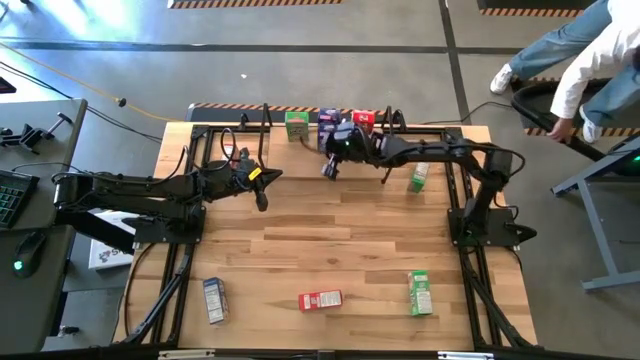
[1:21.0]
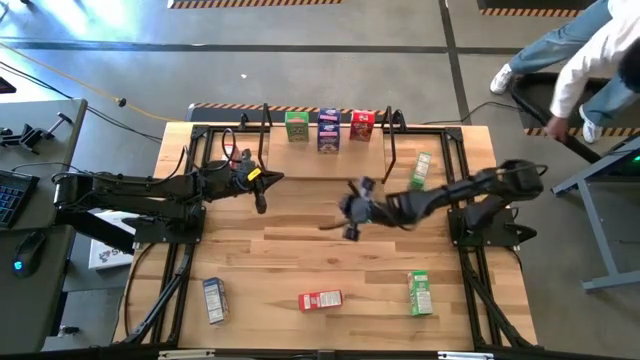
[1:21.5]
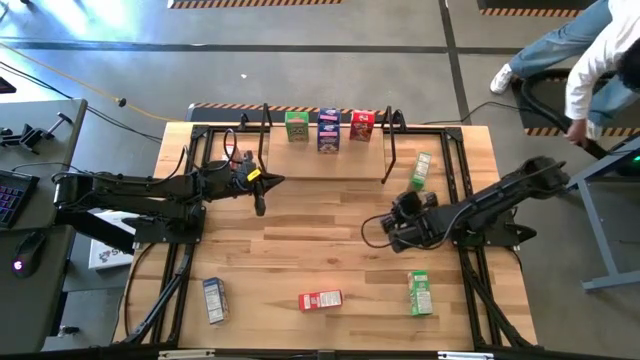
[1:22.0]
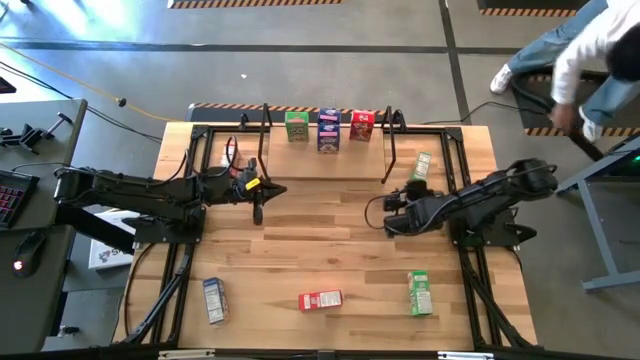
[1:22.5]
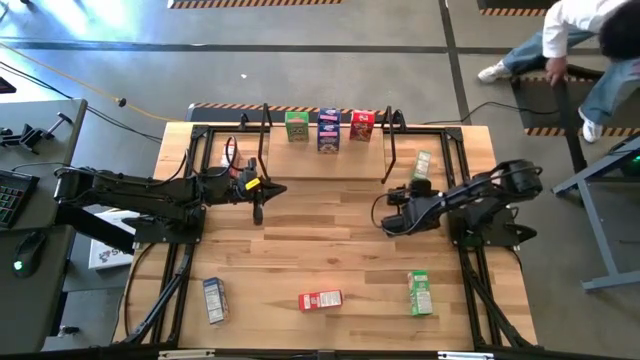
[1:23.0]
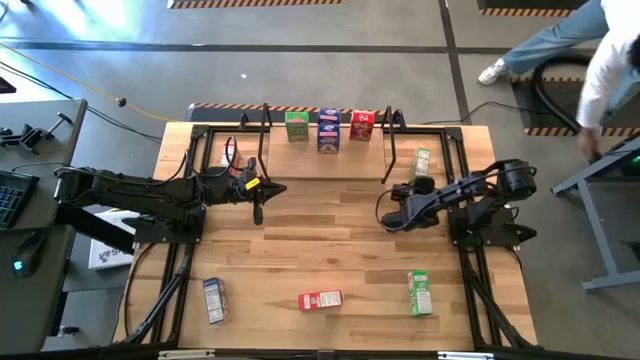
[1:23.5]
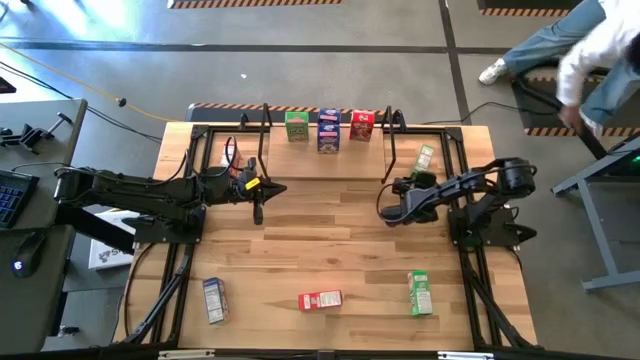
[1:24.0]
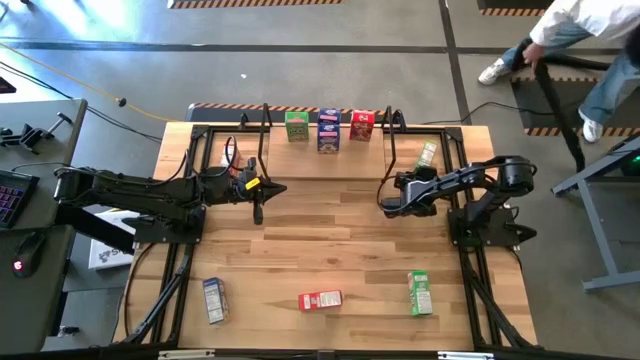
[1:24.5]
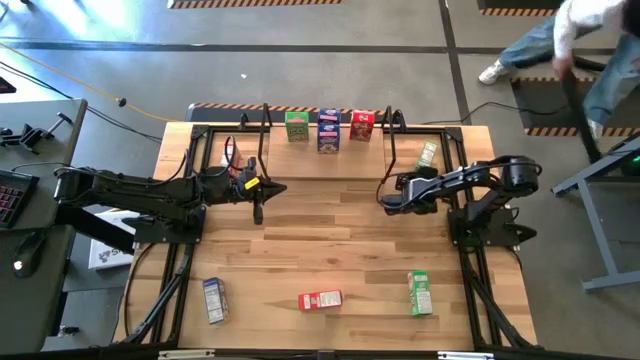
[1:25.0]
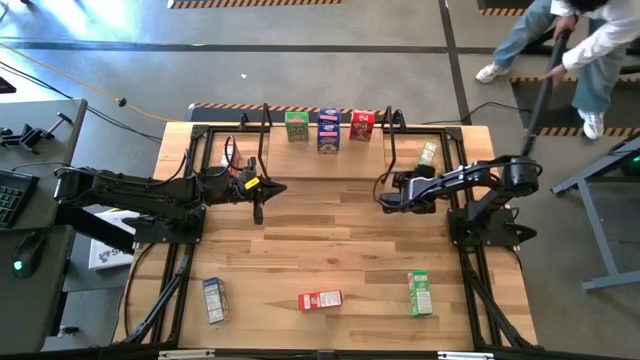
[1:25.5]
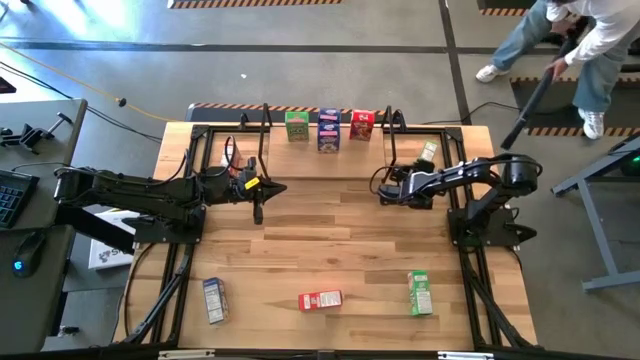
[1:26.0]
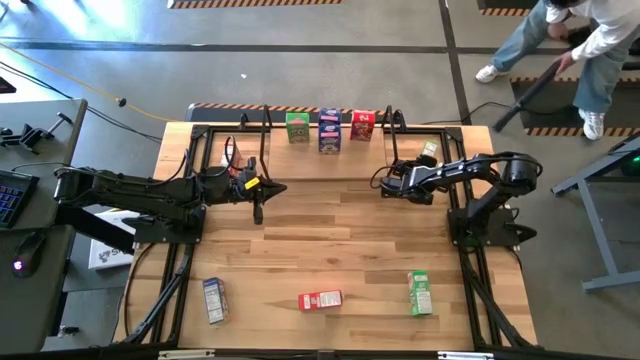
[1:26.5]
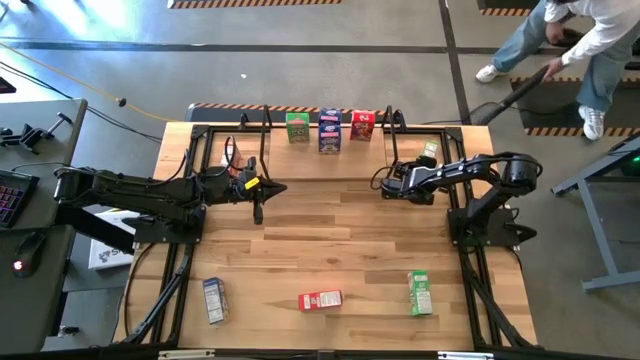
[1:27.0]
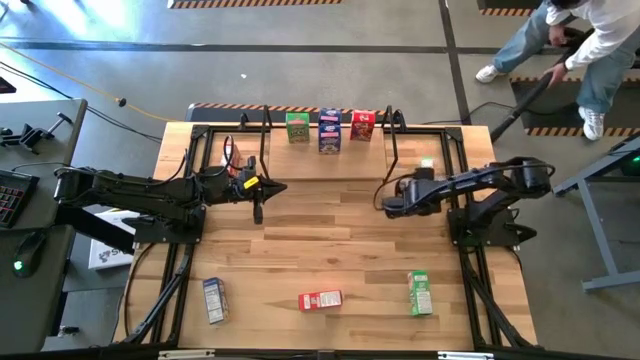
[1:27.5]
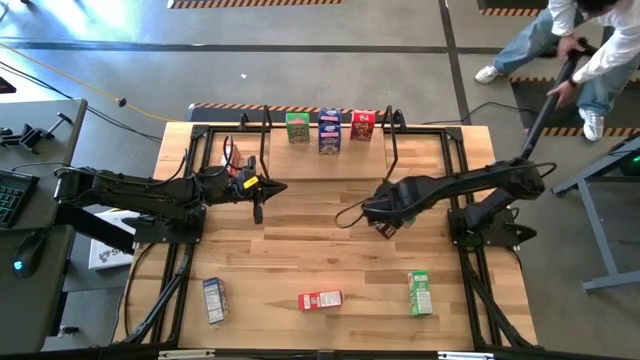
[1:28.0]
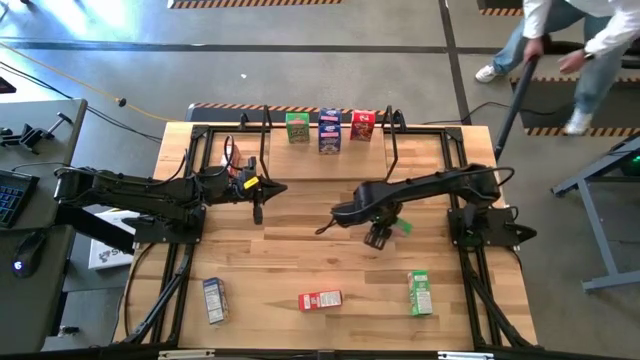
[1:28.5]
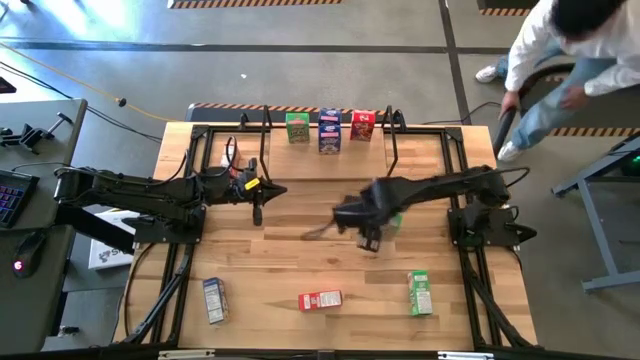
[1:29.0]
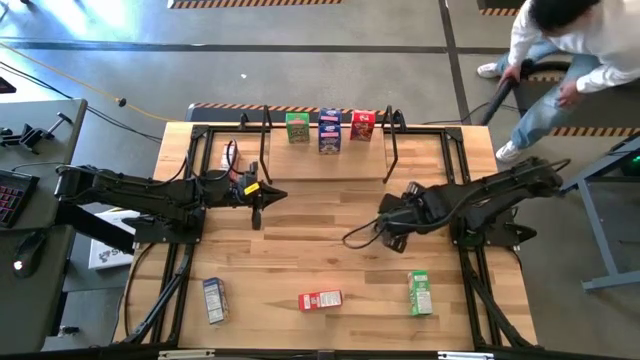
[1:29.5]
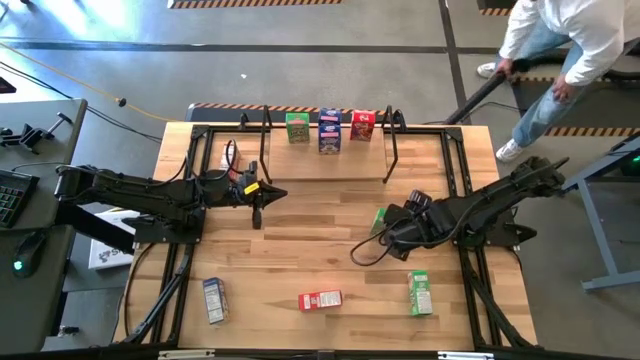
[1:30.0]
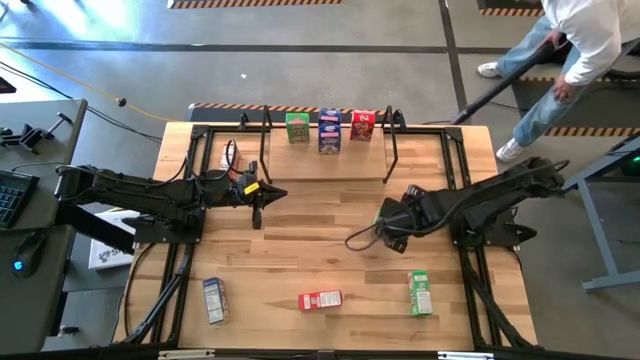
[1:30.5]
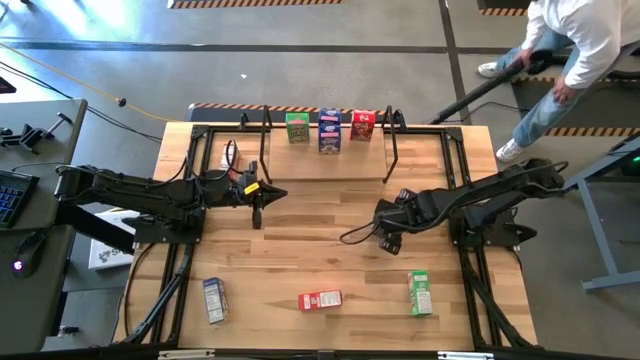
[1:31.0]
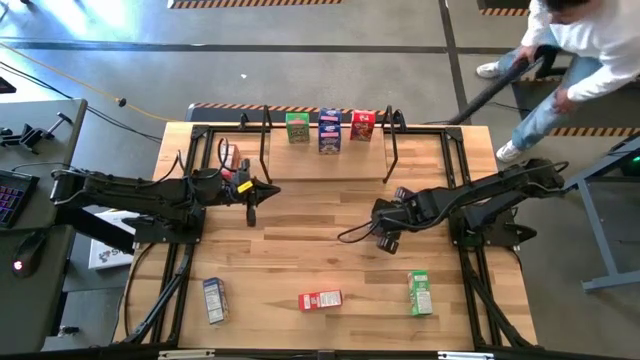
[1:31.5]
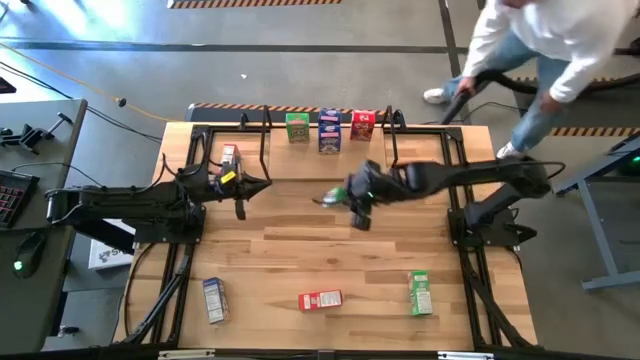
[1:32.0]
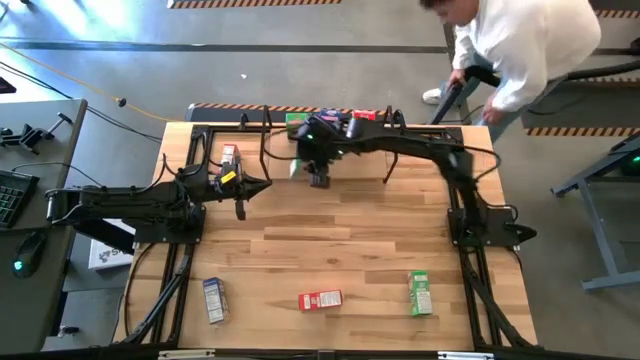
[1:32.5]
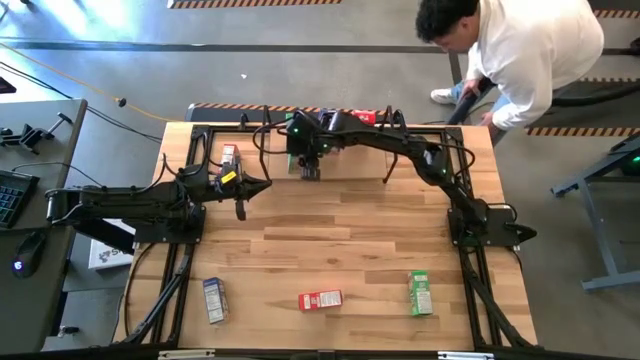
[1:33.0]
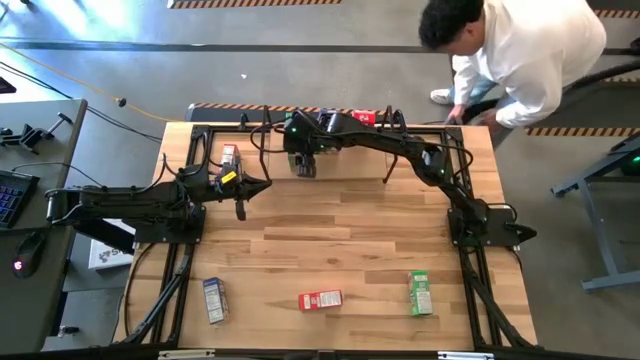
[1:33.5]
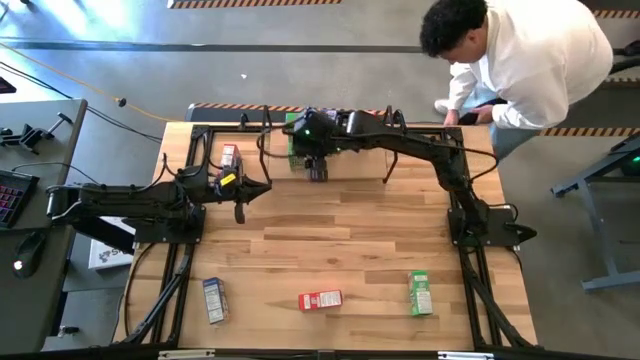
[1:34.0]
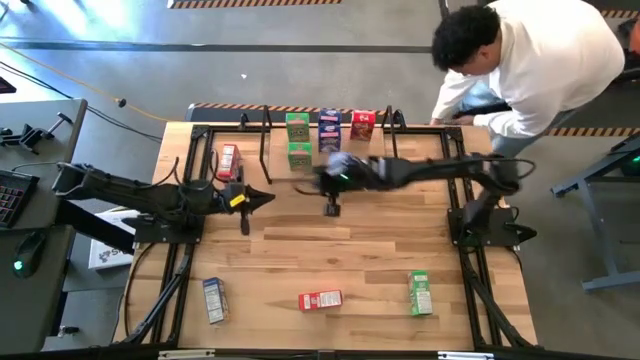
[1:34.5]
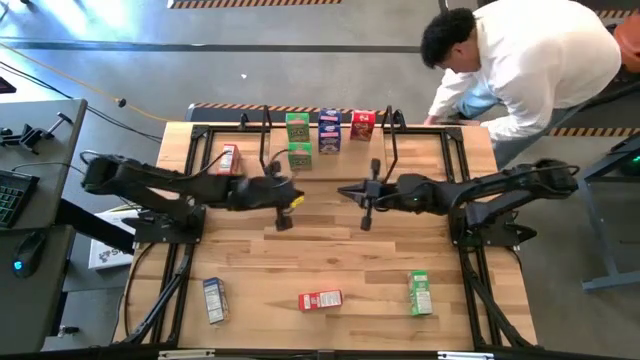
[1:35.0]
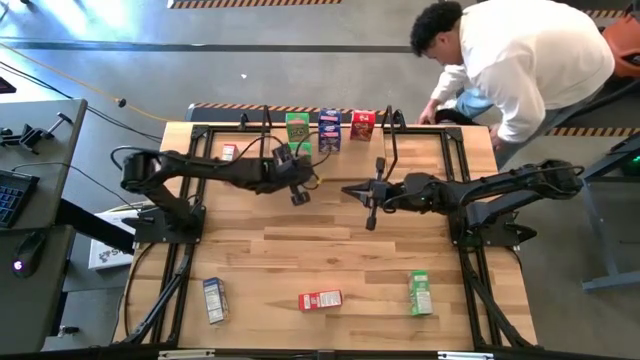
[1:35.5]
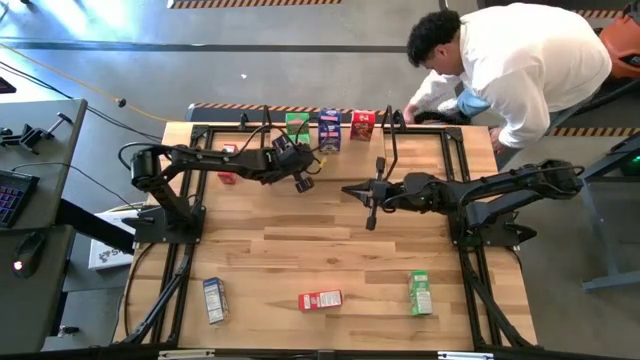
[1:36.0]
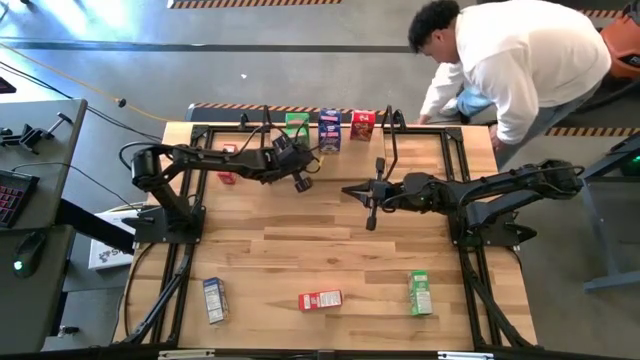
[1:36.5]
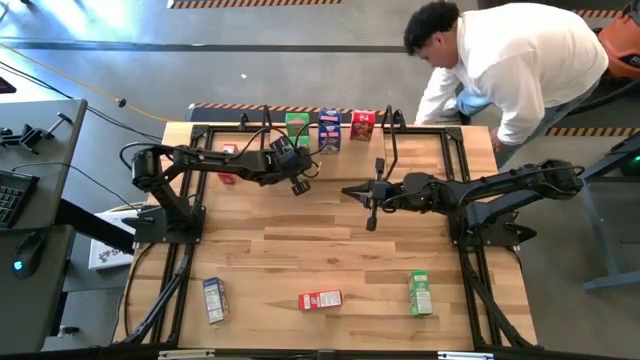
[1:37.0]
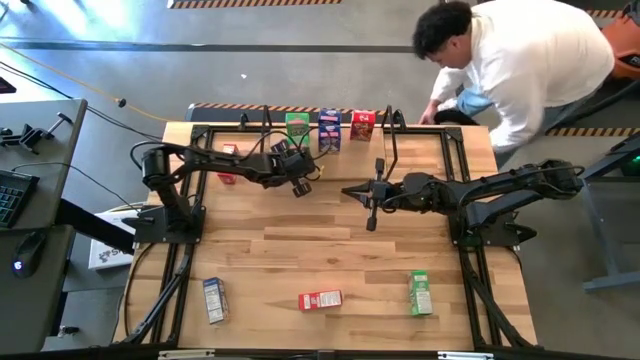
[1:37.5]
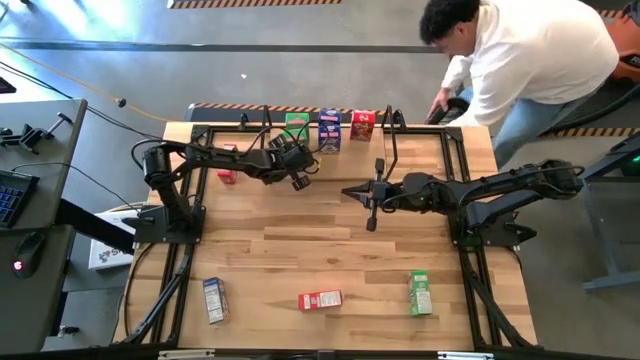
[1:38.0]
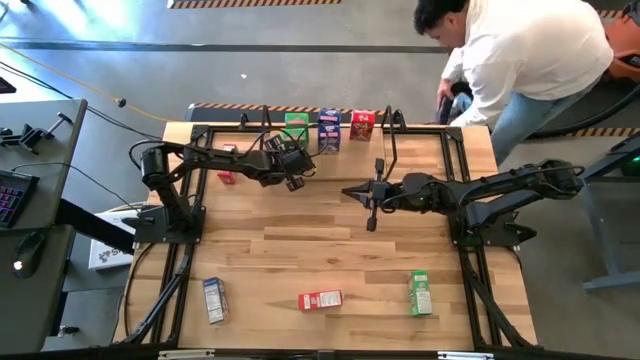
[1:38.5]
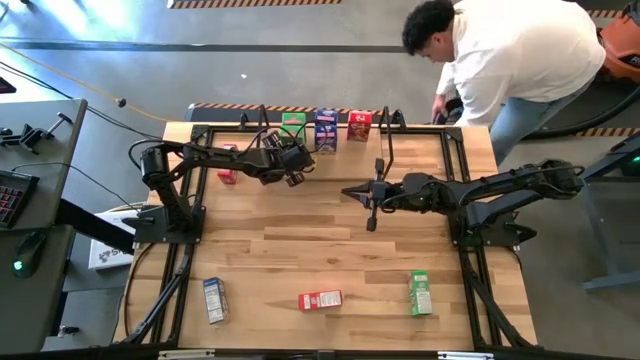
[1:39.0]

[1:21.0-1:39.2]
Task: Stack cereal on shelf
Put the top green cereal box on the shelf aligned with the green cereal box

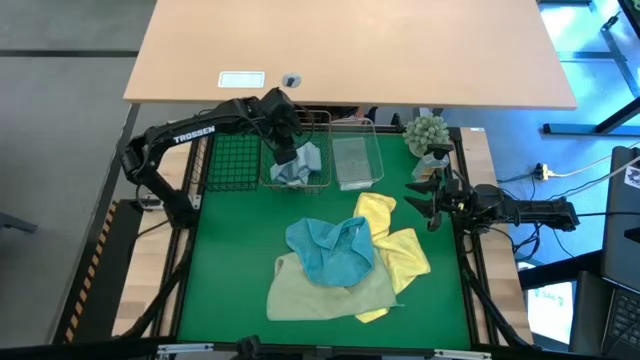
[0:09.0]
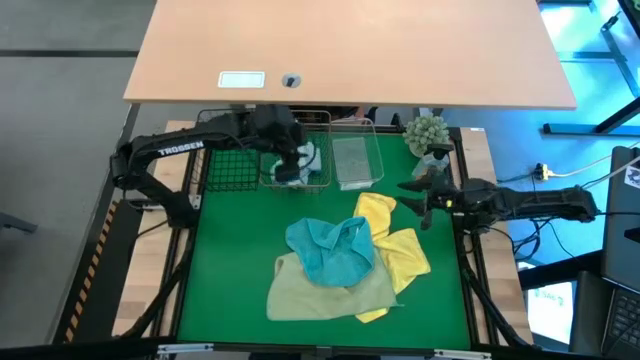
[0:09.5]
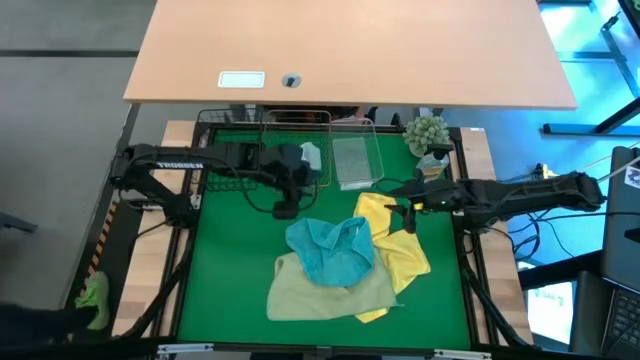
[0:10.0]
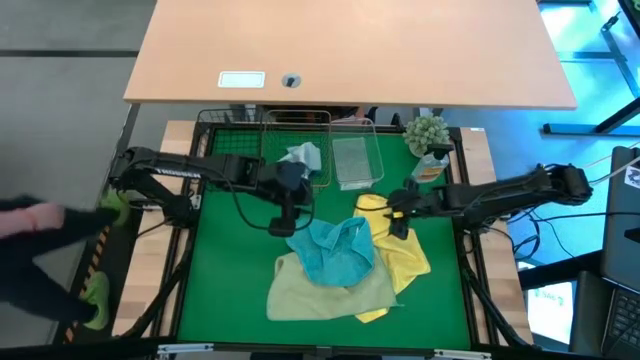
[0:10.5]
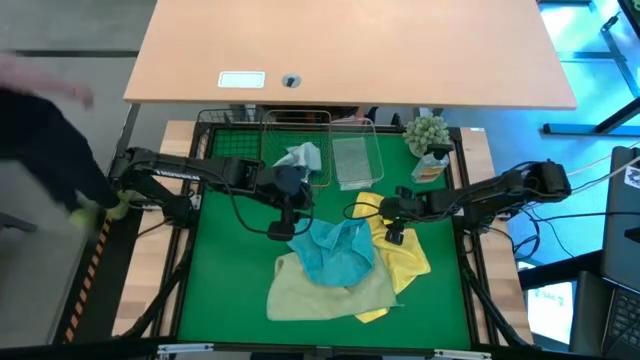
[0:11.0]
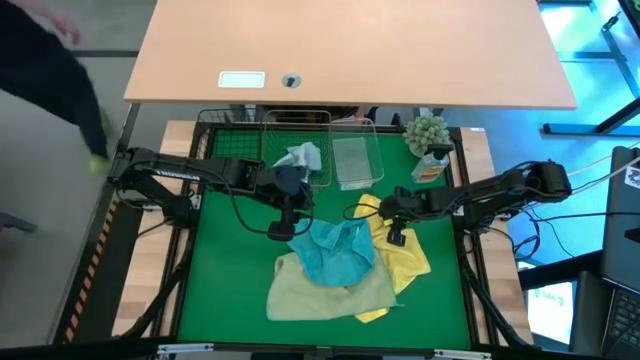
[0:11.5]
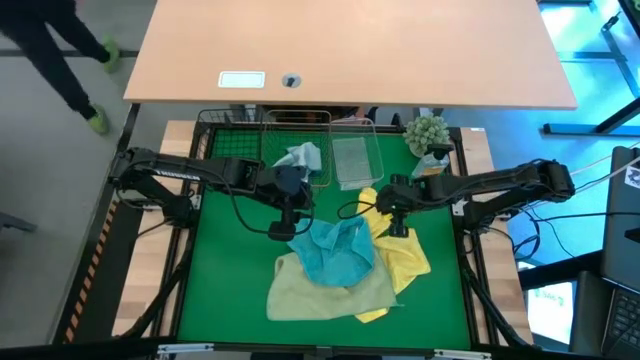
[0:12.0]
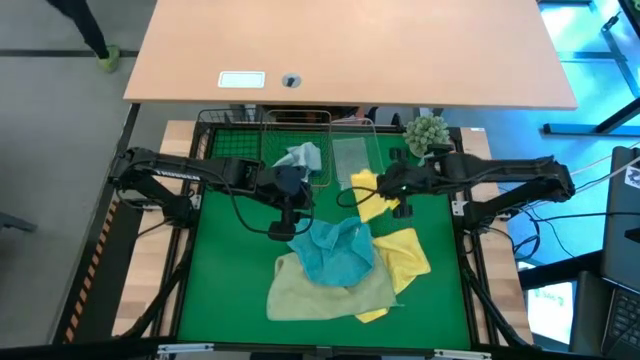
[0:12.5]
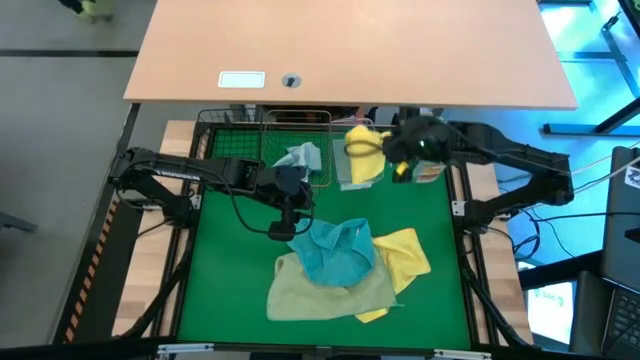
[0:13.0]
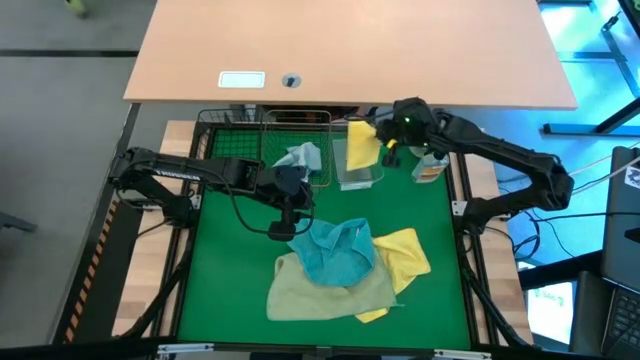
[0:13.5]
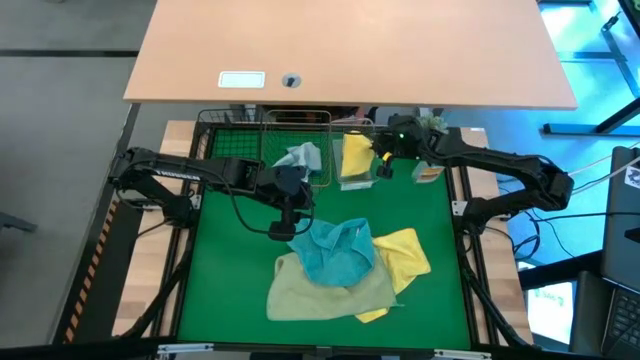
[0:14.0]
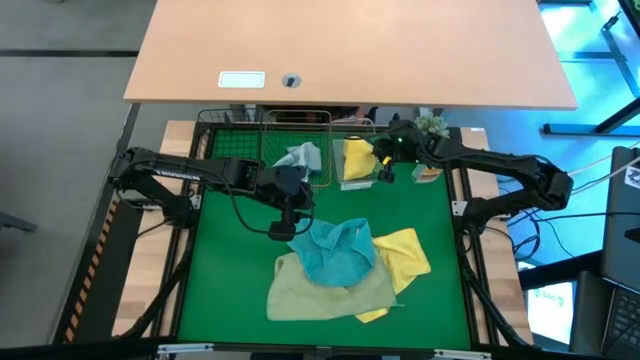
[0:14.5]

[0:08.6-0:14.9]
Task: Sort microfiber towel by color & place in baskets
Put the top yellow microfiber towel into the transparent bin
